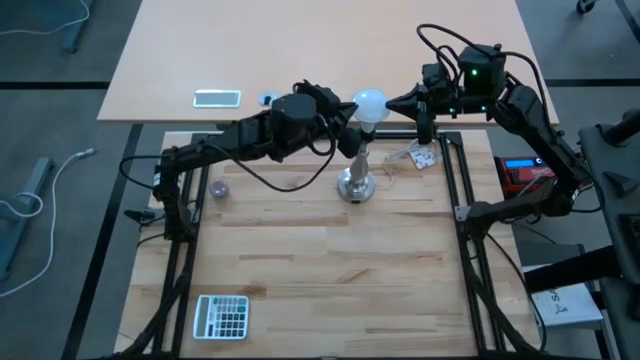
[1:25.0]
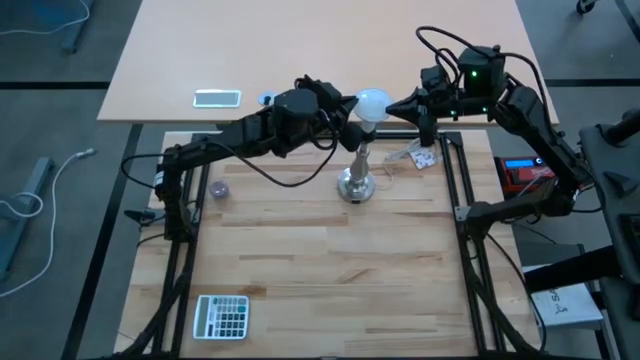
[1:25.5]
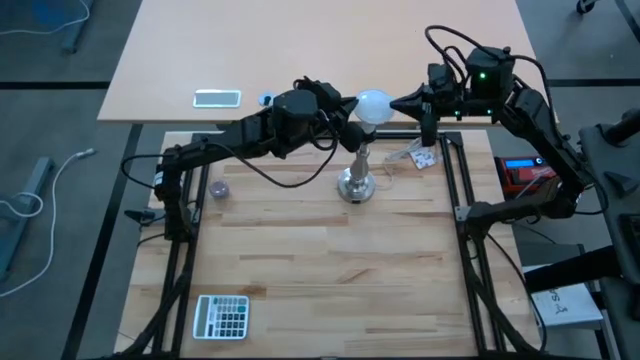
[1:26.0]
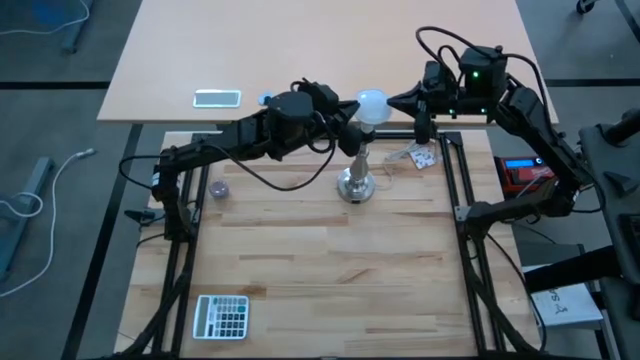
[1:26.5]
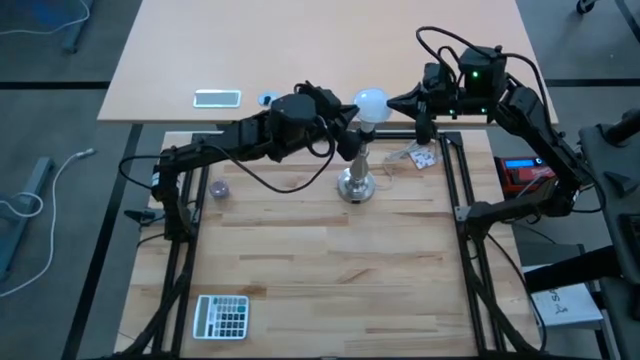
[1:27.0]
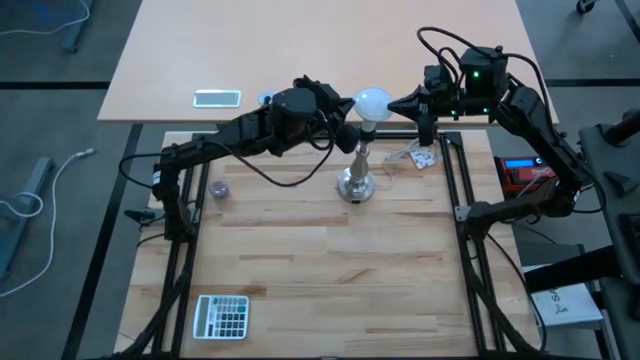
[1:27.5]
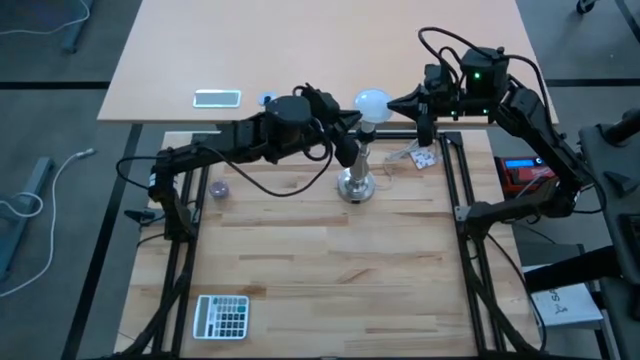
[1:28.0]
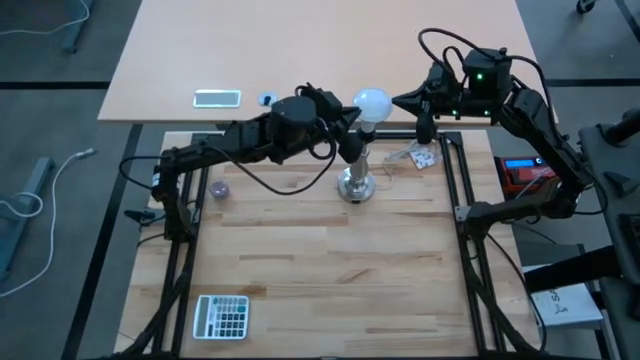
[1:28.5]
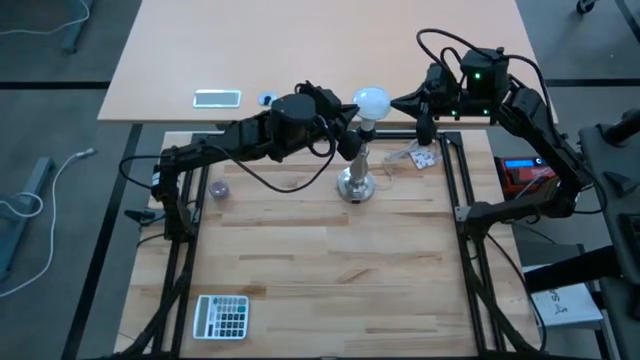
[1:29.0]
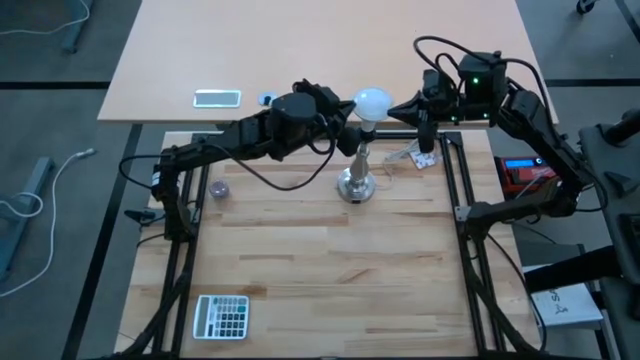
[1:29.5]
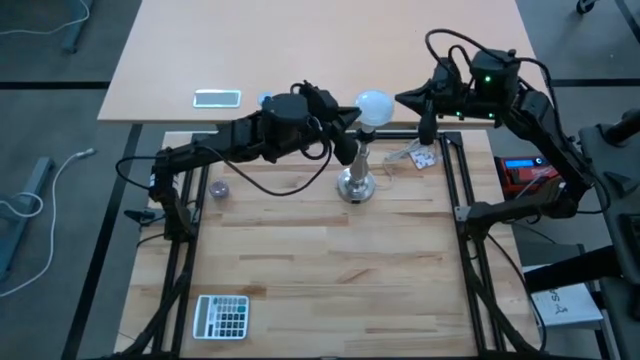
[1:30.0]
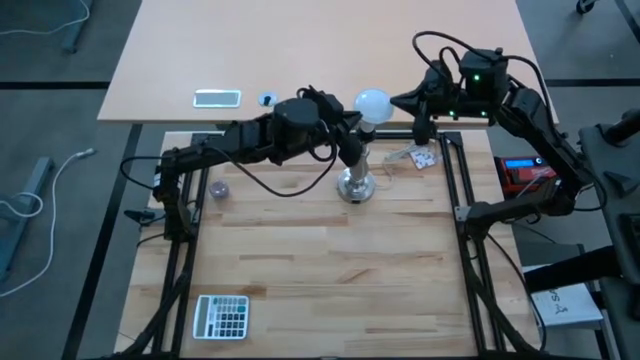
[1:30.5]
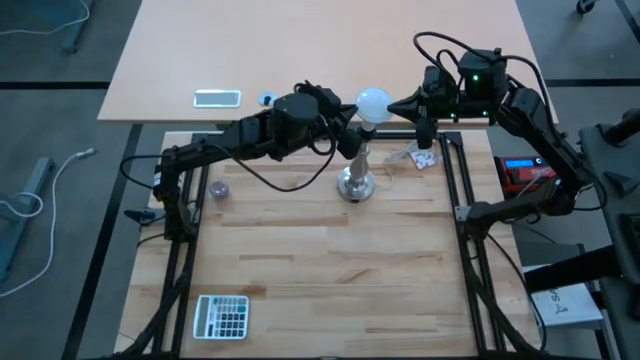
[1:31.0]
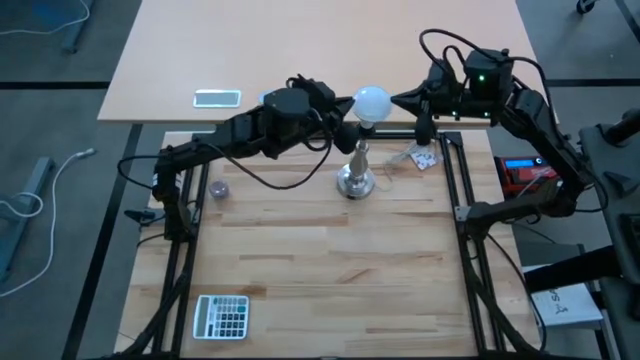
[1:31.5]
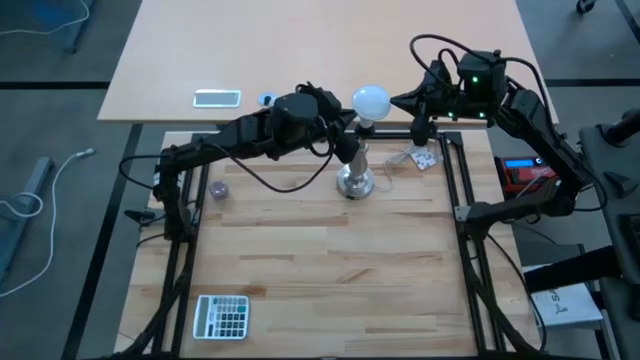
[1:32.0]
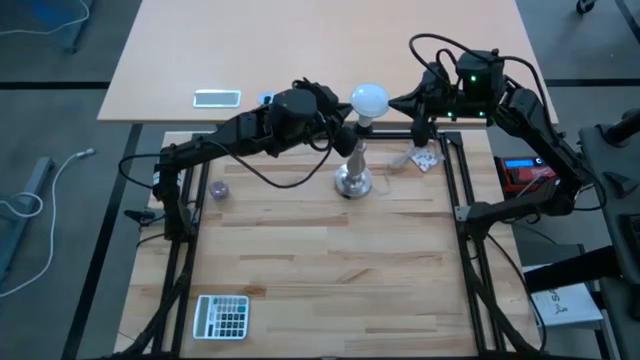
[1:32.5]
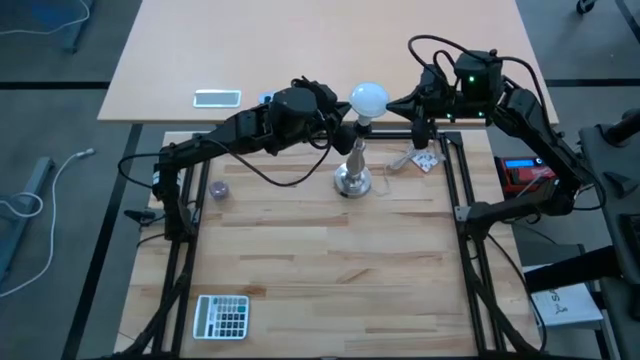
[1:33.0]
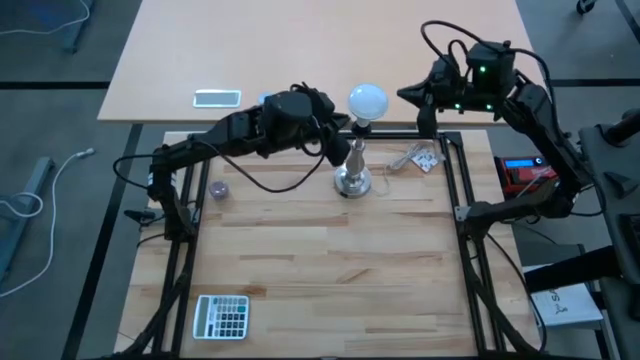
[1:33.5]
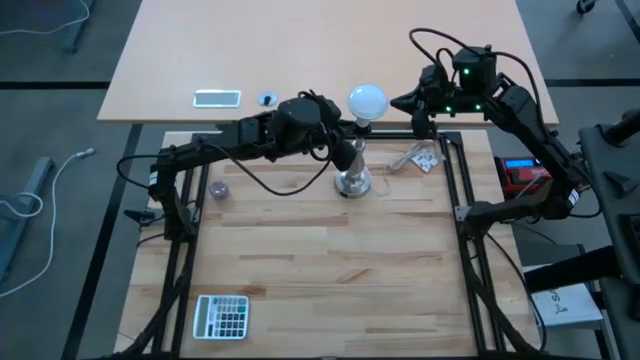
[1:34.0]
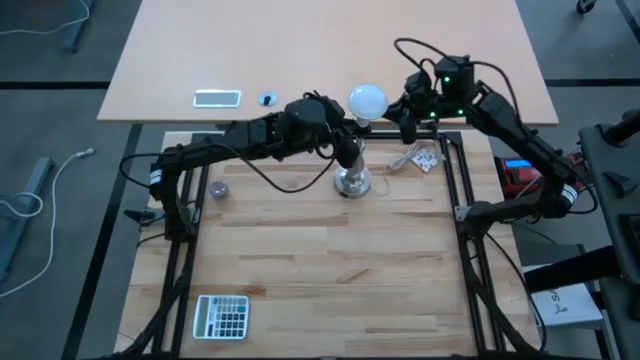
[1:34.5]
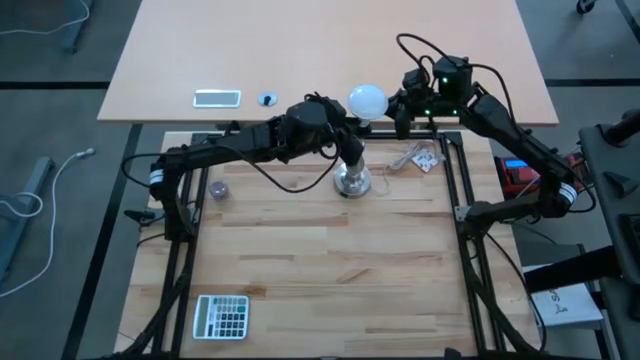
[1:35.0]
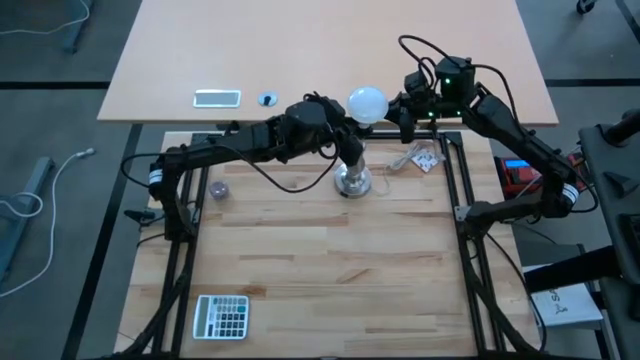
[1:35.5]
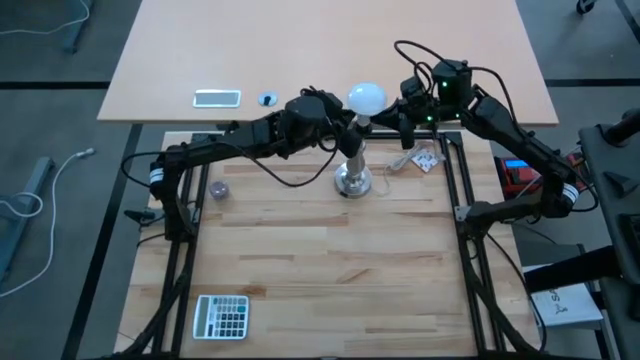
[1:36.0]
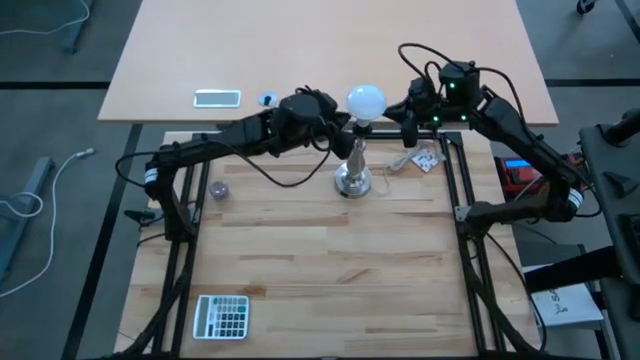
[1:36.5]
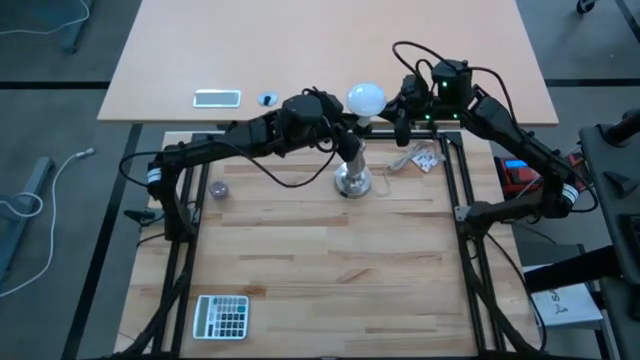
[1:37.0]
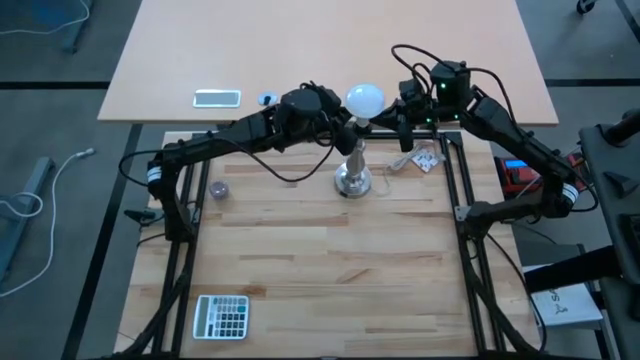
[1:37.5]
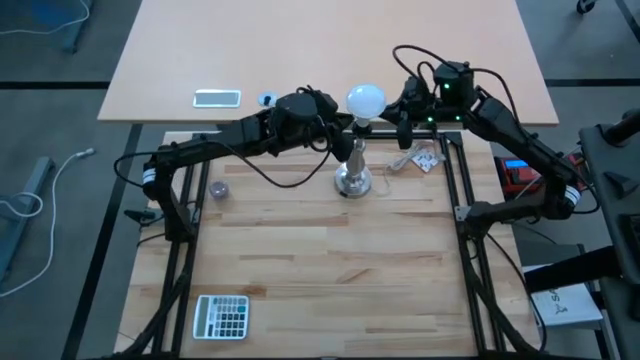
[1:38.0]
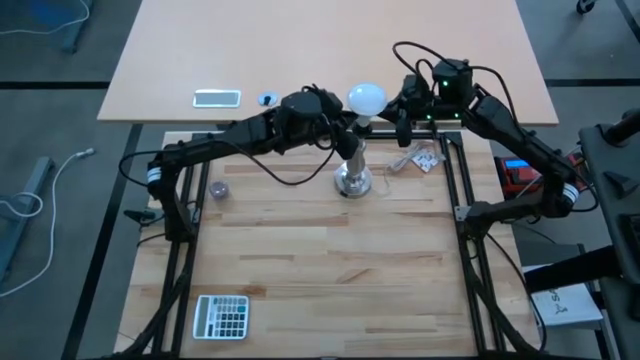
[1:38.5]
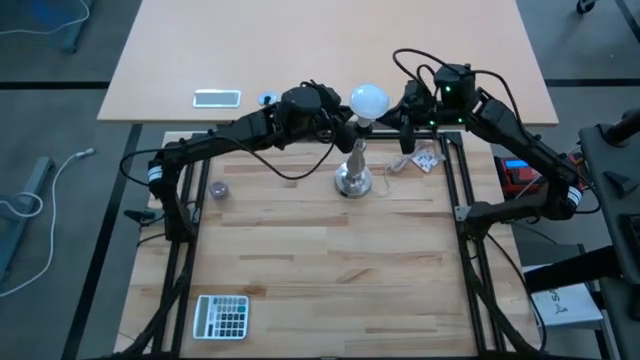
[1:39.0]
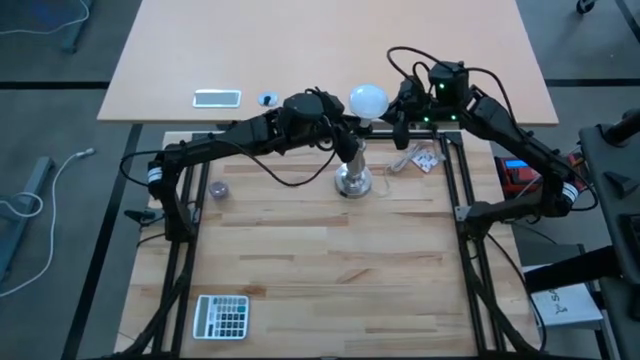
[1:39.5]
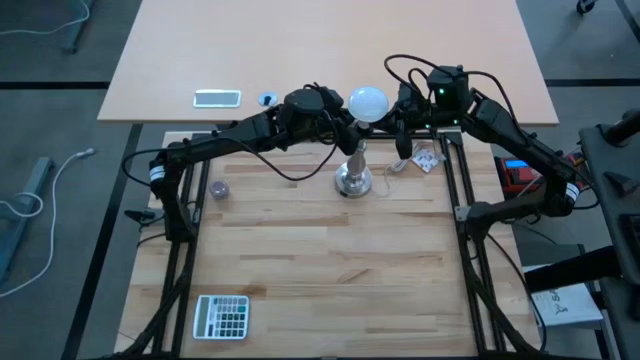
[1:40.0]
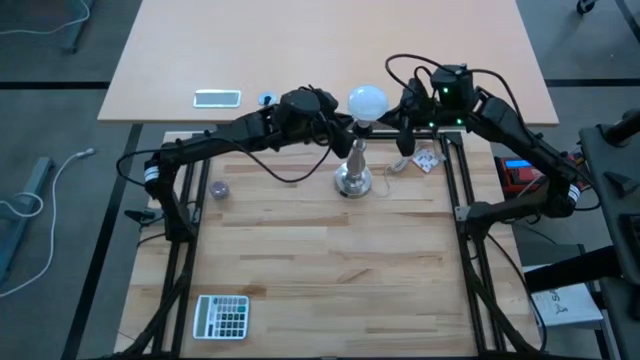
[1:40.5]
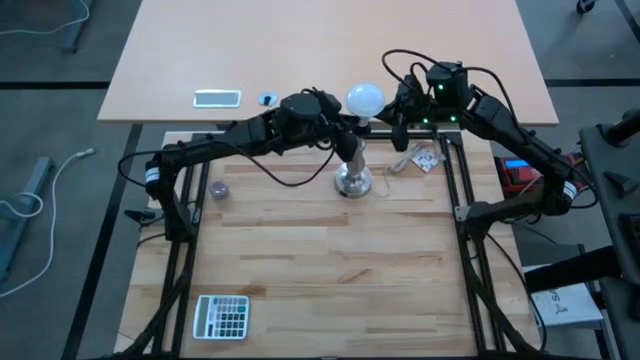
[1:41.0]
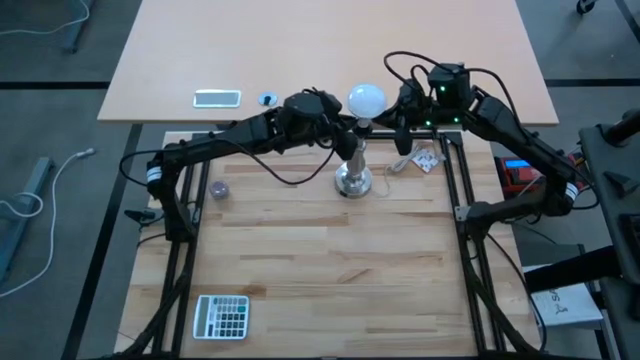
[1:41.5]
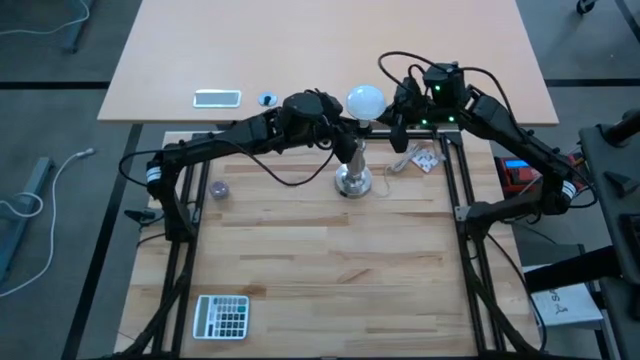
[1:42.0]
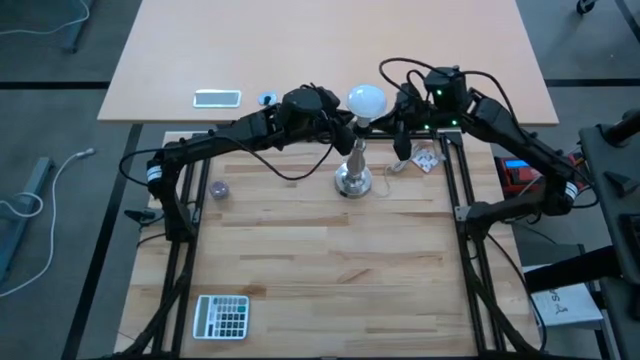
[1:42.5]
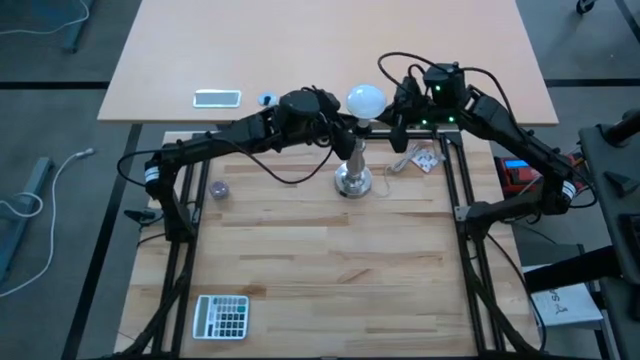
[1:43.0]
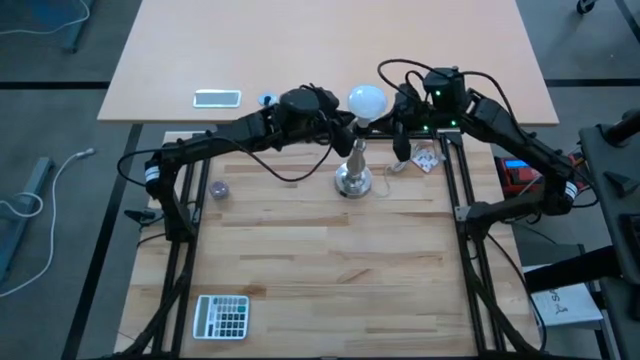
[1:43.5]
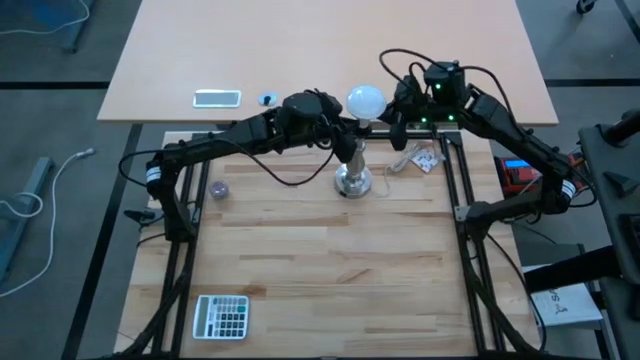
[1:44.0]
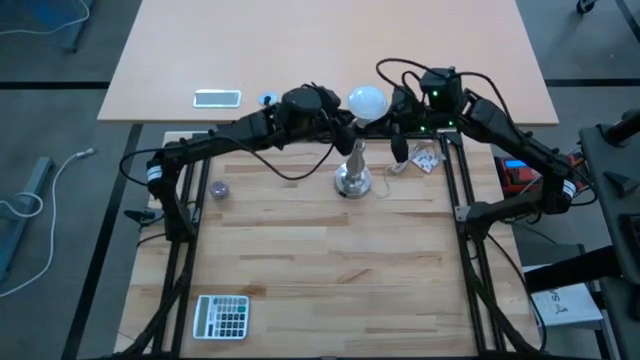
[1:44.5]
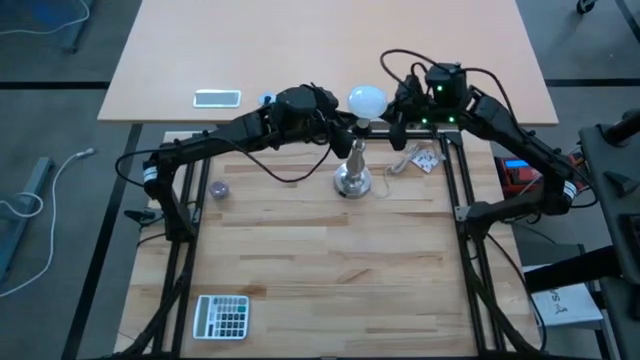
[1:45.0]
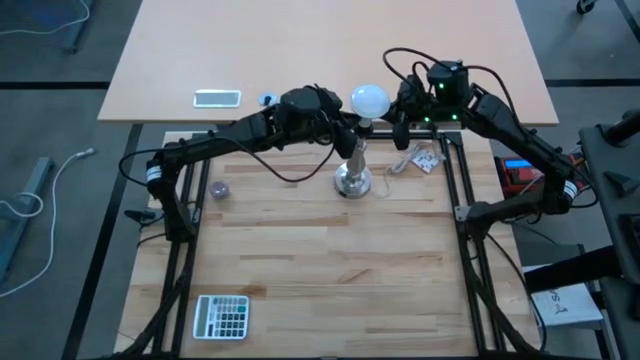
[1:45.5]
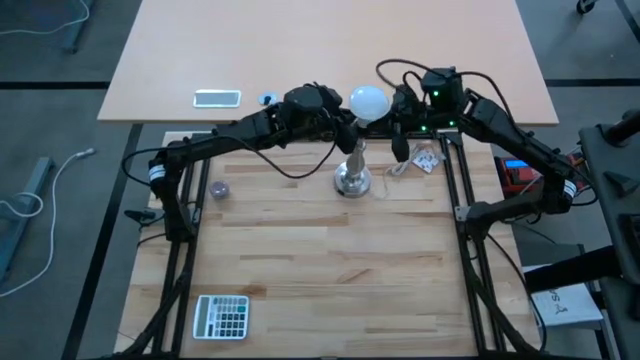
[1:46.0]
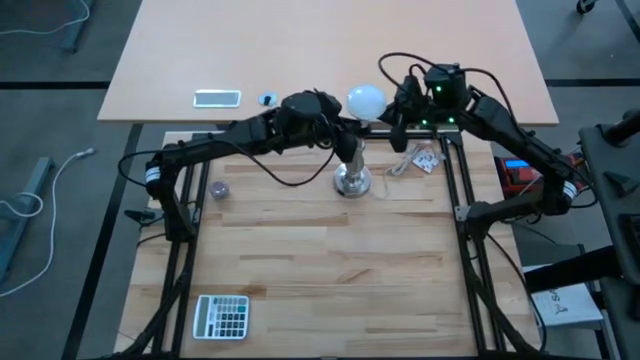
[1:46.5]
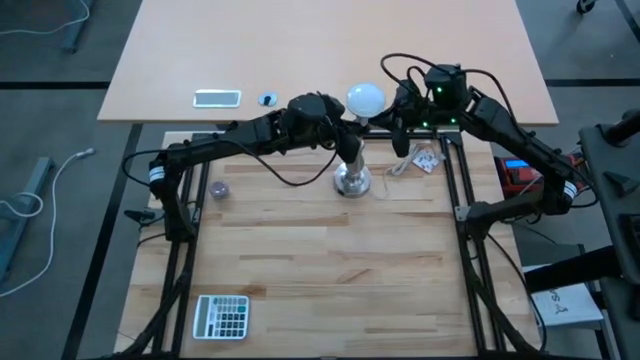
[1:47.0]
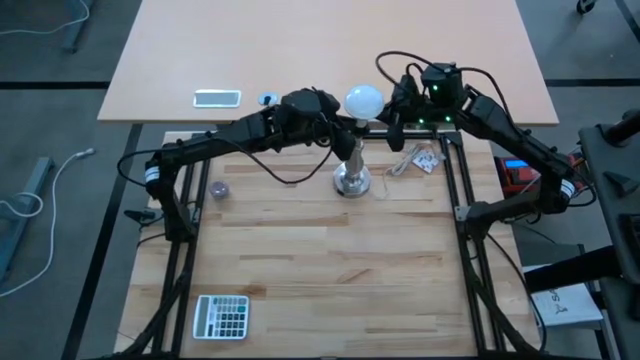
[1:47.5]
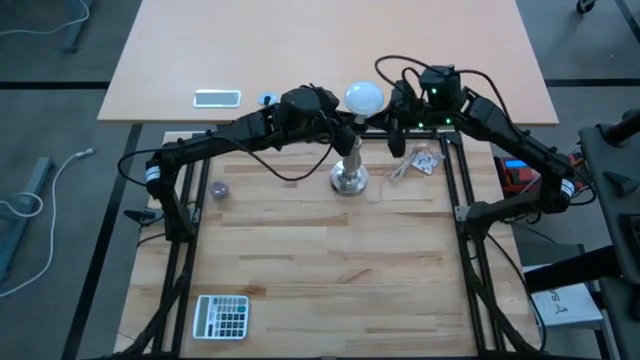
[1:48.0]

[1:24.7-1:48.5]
Task: Screw lightbulb
Insert the light bulb into the lamp
